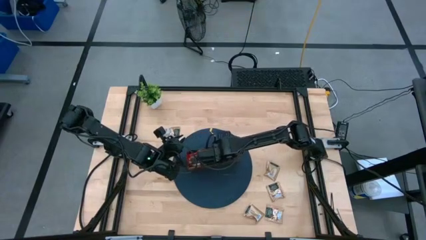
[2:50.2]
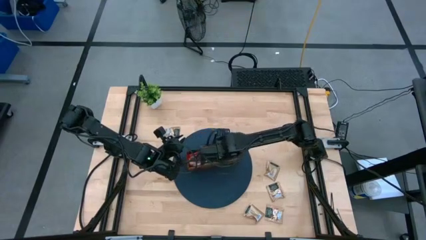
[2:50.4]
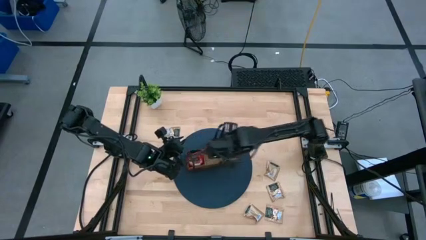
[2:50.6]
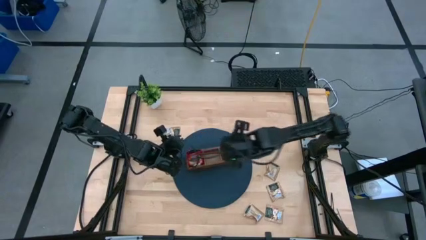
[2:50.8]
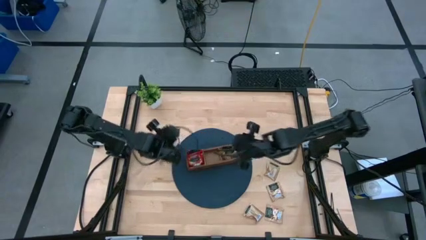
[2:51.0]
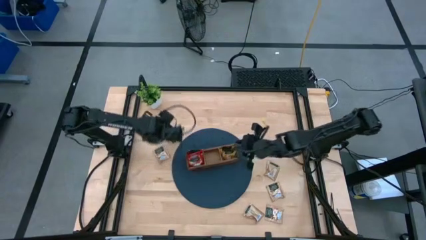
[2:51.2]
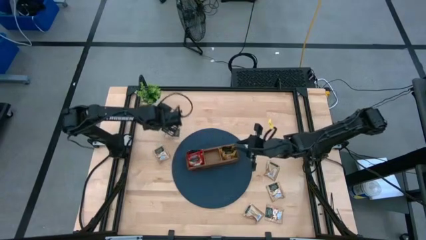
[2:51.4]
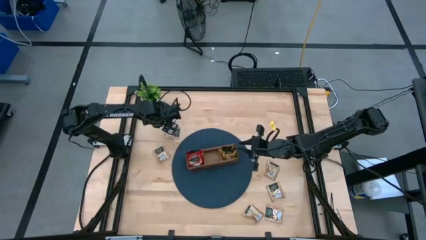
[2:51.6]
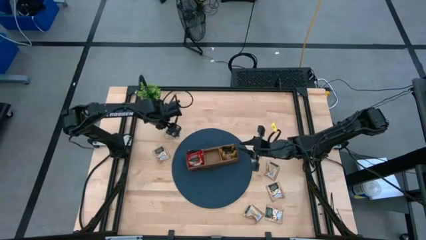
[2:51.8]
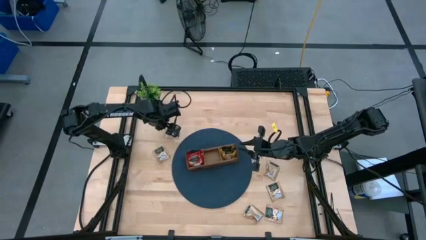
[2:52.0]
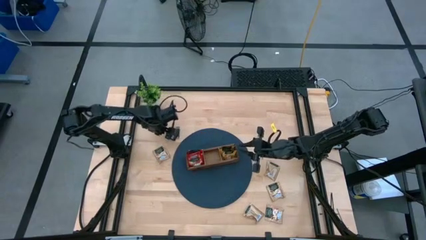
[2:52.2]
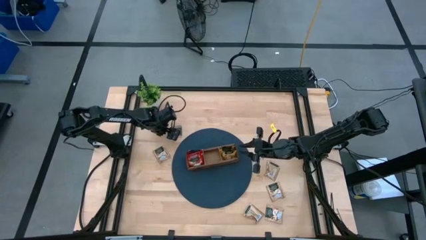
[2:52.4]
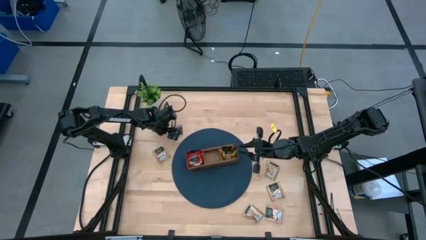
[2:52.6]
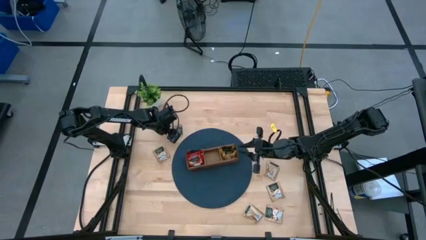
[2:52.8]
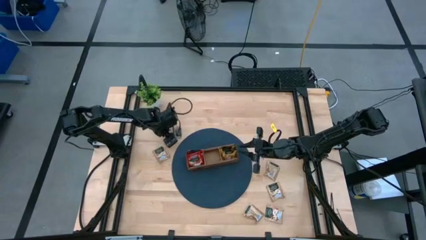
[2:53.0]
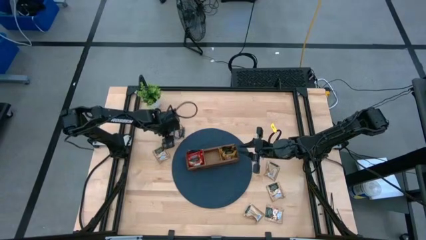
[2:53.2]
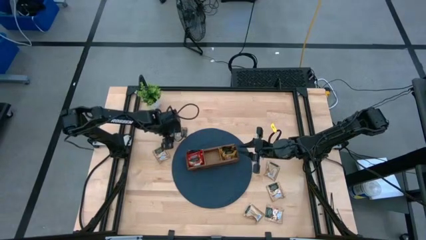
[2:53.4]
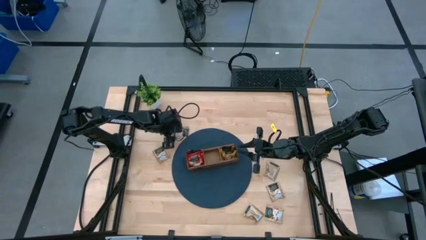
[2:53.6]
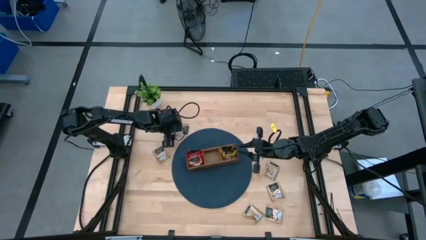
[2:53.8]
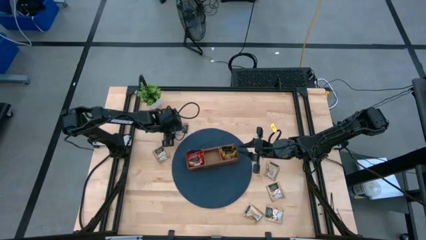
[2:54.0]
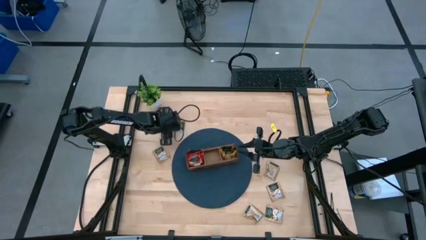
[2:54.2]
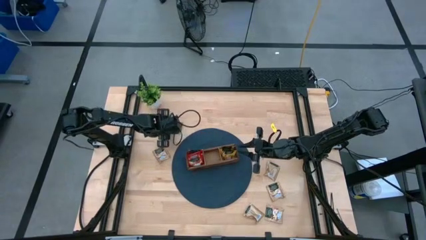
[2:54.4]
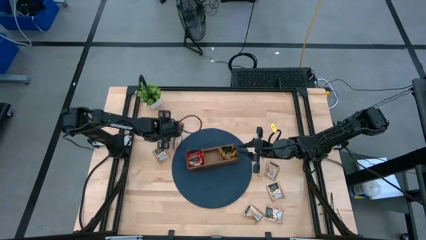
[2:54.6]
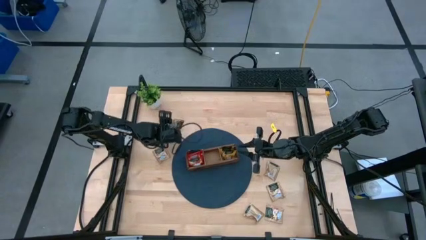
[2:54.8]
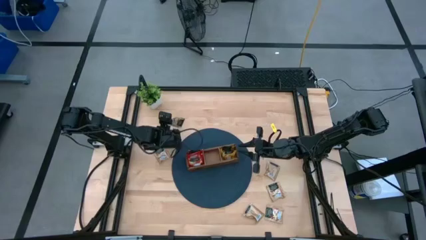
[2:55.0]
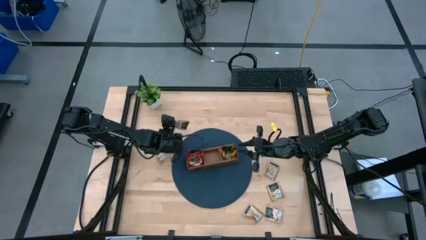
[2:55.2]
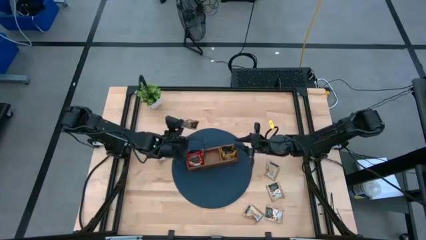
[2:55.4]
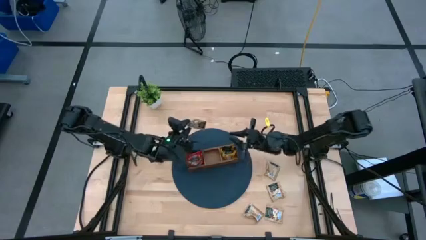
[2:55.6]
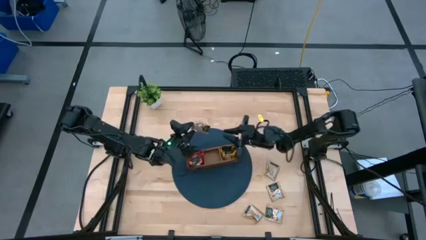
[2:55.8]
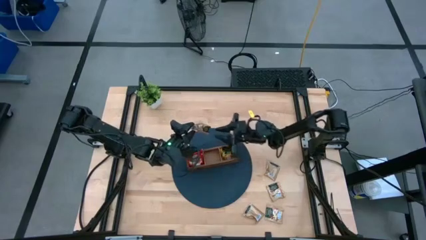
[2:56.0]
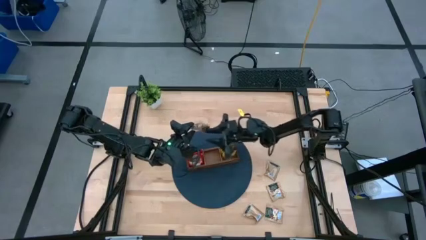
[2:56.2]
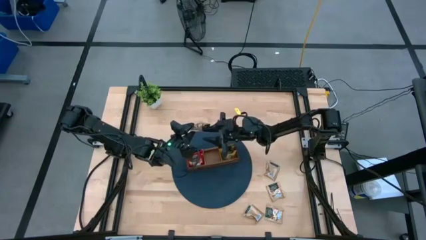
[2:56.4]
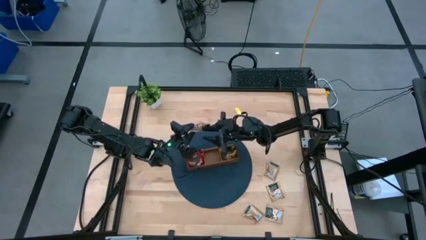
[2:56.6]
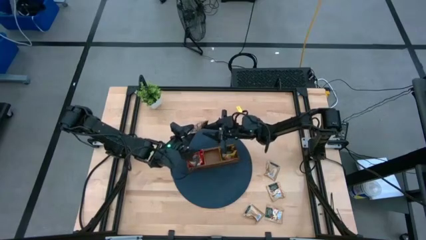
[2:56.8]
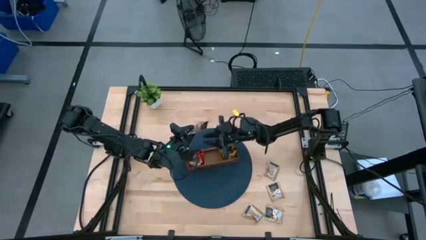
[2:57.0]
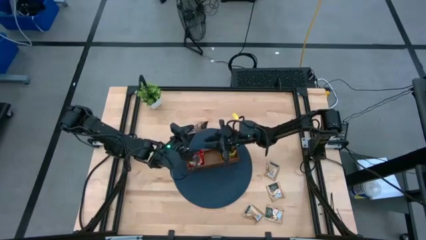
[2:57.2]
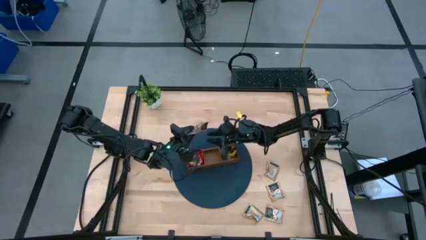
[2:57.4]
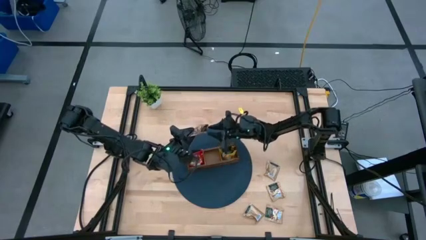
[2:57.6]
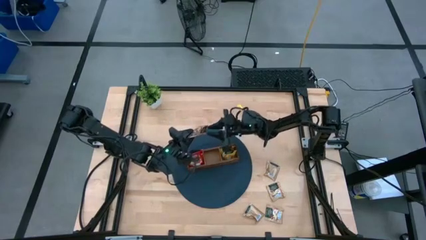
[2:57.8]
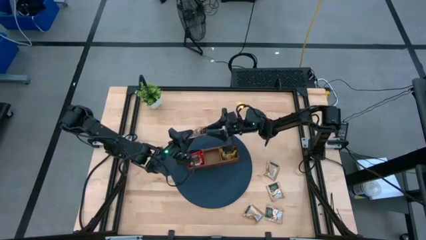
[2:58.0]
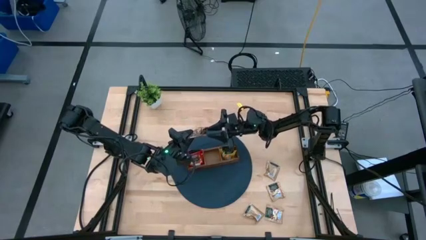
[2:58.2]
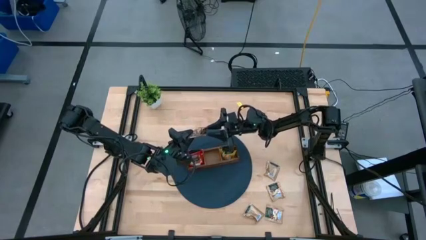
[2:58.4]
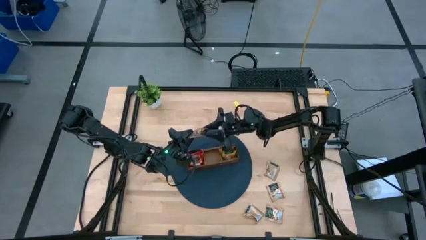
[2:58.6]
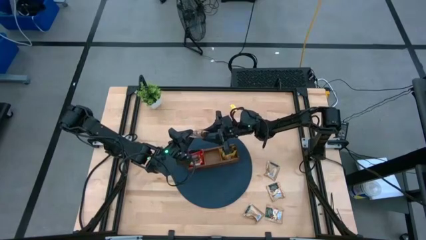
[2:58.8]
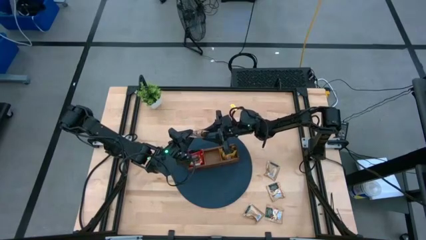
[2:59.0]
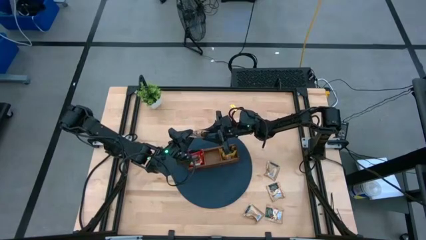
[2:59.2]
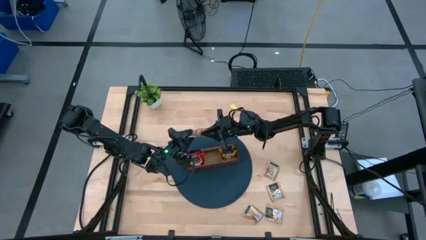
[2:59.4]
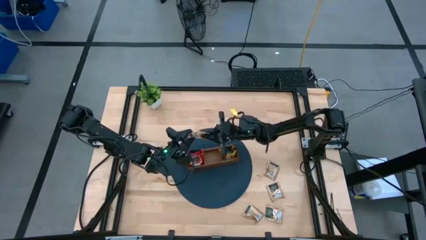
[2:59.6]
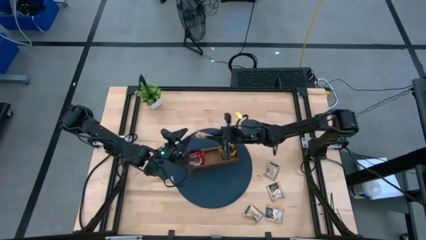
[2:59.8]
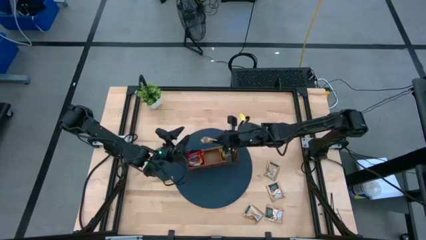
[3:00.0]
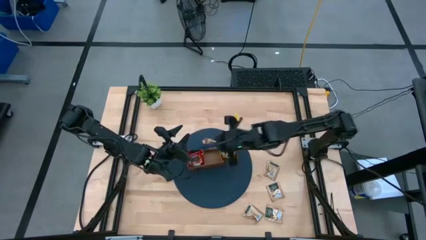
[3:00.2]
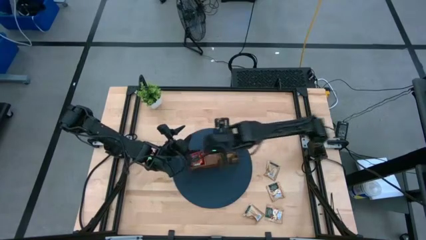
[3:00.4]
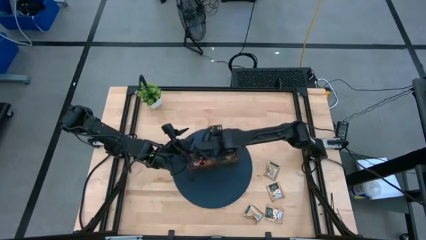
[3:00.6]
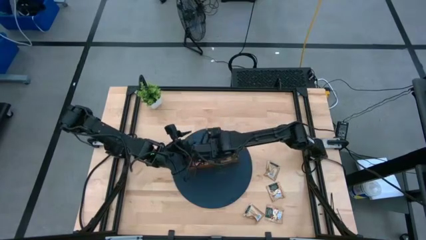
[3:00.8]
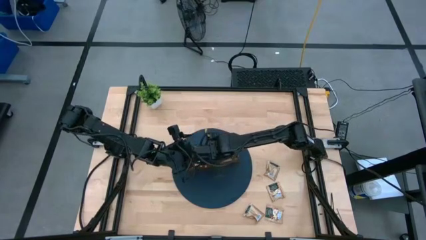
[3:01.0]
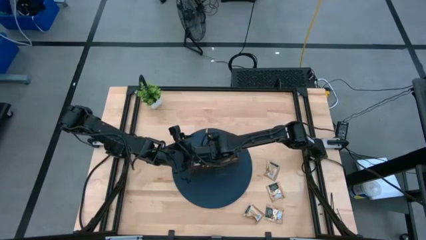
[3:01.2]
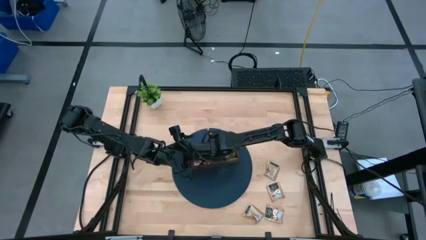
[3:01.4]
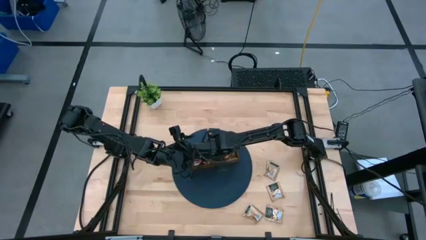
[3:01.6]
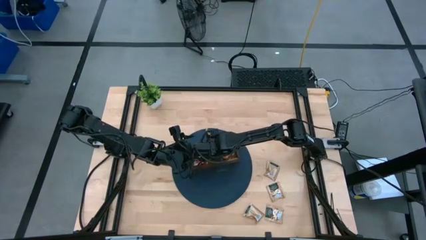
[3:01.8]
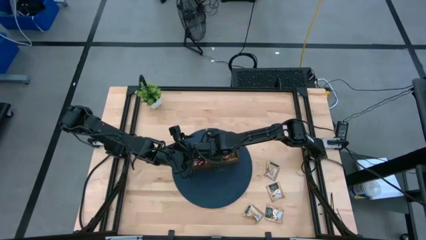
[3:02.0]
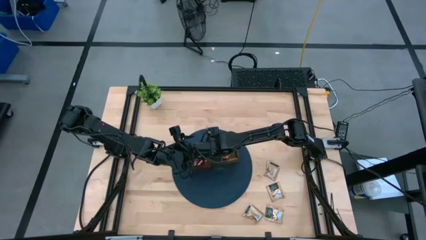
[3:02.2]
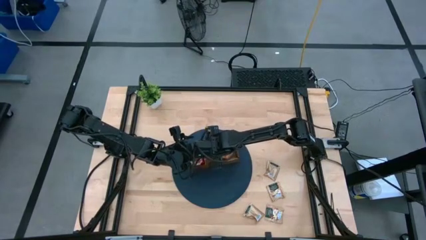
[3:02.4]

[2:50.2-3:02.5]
Task: Pick & Place Tea
Put the brown tea bag into the middle section of the wooden organizer

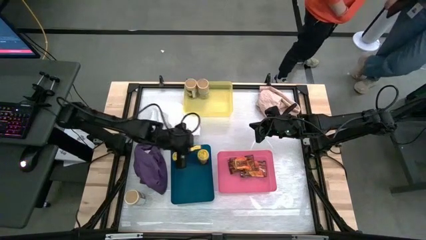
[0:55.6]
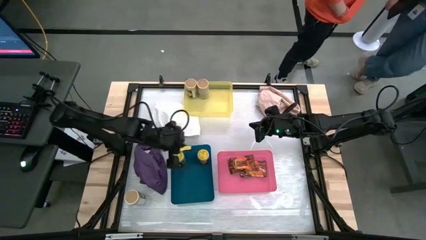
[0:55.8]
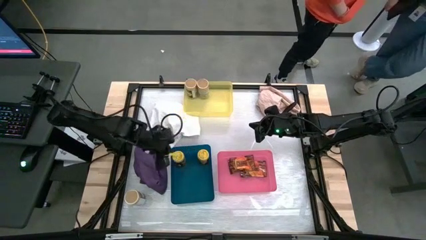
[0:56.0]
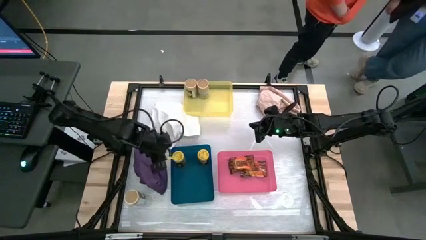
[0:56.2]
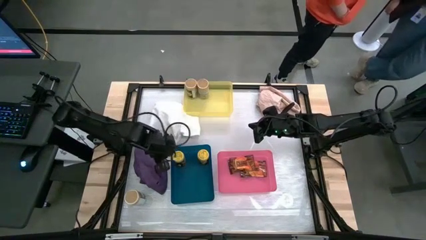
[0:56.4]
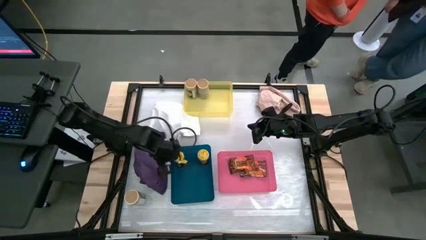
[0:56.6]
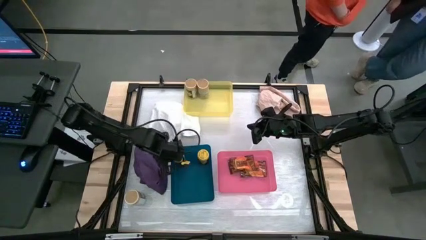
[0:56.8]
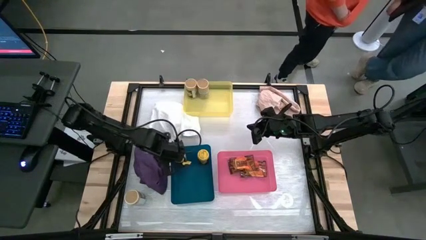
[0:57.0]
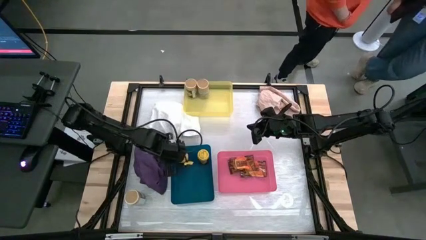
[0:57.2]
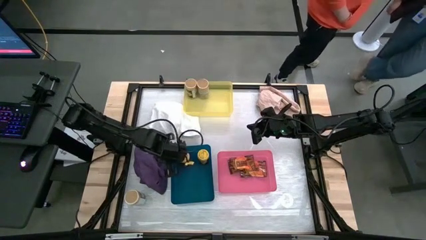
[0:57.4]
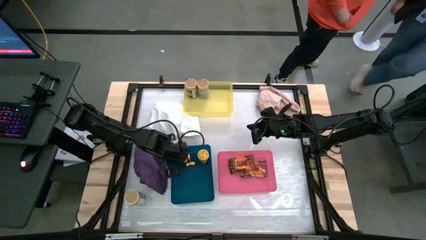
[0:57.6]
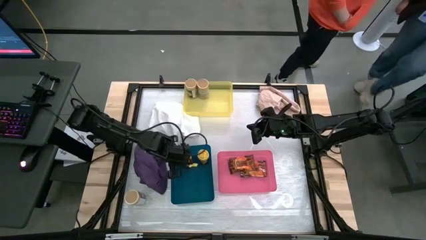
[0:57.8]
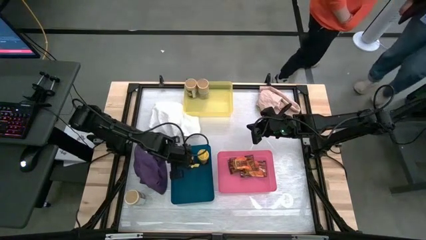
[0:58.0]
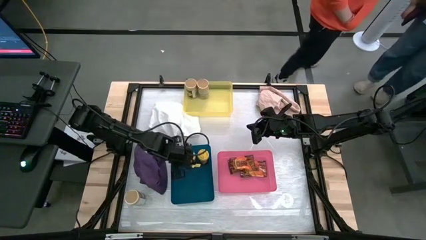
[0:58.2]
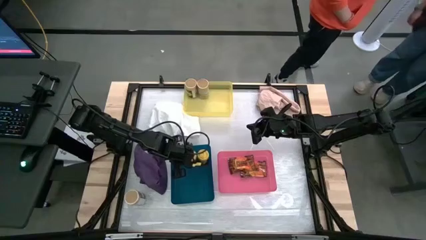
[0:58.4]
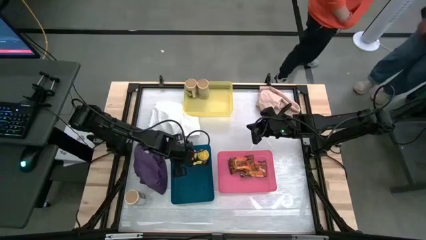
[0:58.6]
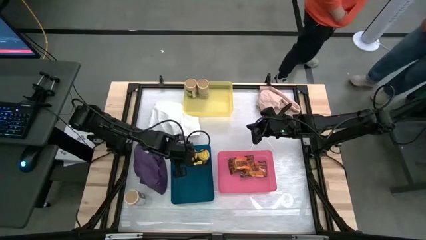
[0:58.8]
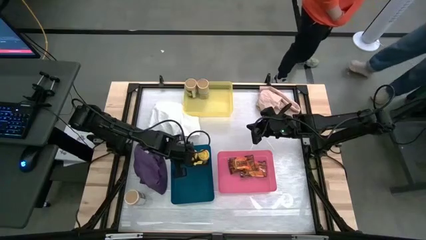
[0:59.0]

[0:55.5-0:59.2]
Task: Sort spices by type
Adjust the left yellow seasoning bottle in the blue bin

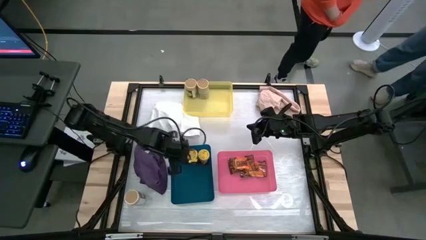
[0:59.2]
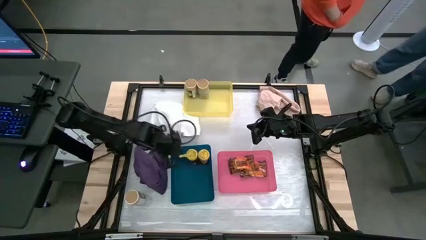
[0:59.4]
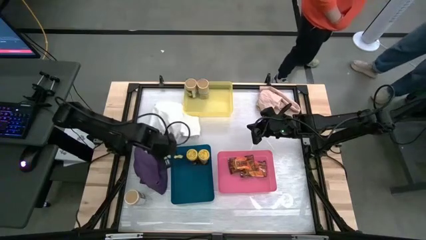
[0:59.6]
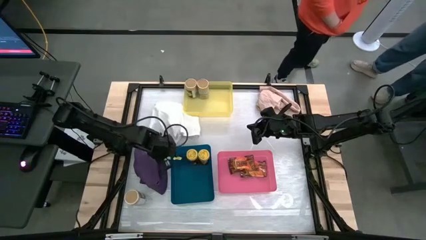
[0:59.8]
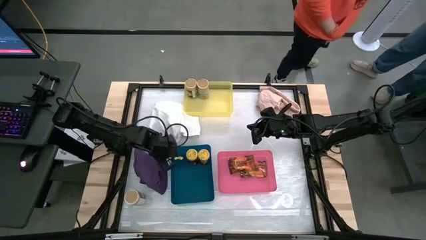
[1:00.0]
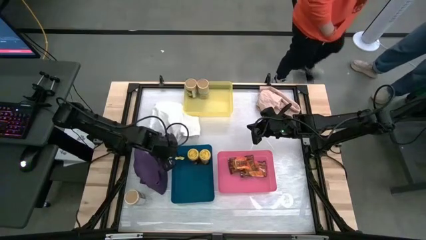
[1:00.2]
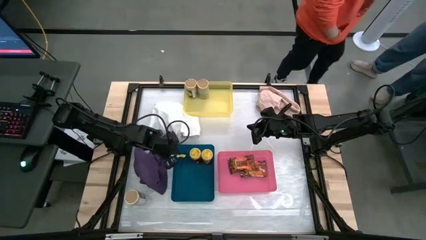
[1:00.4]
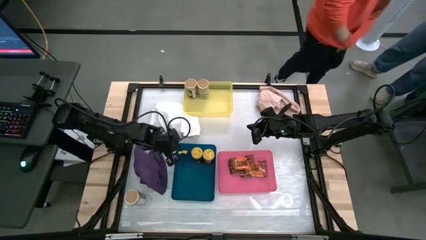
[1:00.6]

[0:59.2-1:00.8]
Adjust the blue bin
